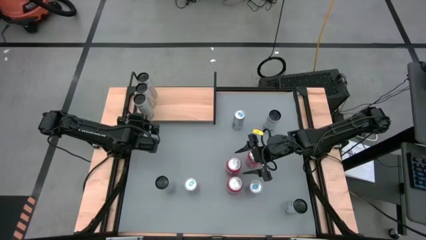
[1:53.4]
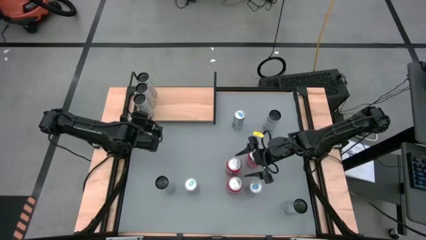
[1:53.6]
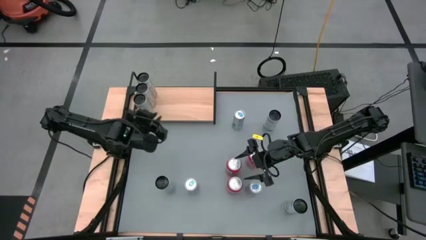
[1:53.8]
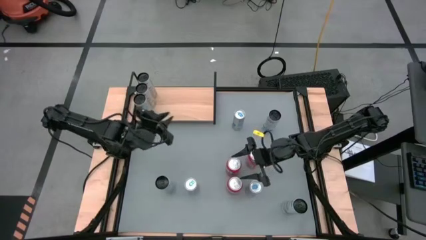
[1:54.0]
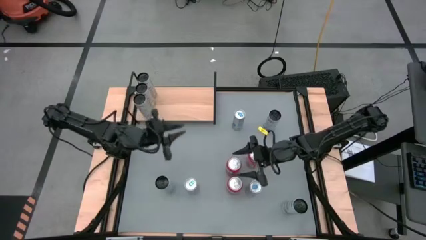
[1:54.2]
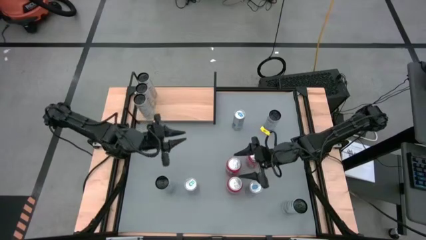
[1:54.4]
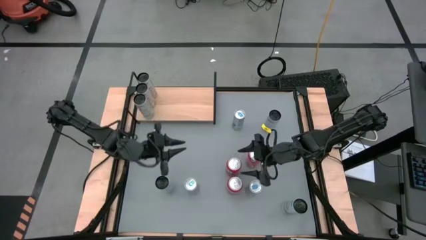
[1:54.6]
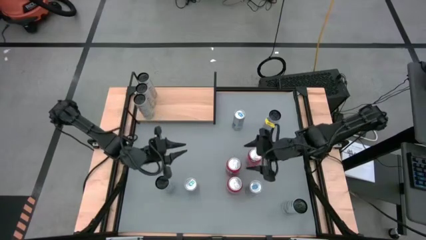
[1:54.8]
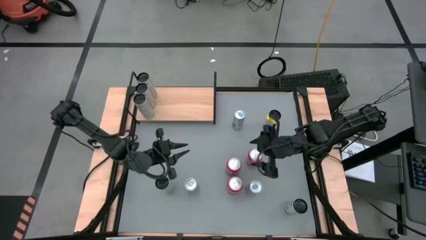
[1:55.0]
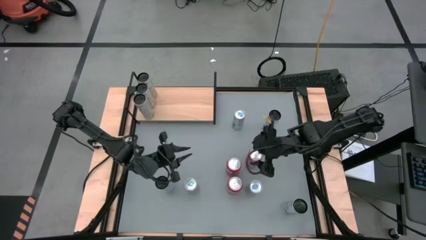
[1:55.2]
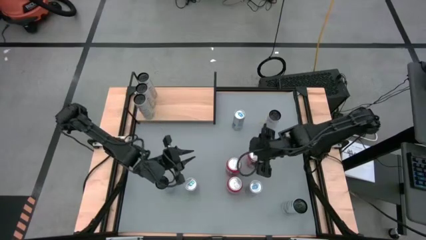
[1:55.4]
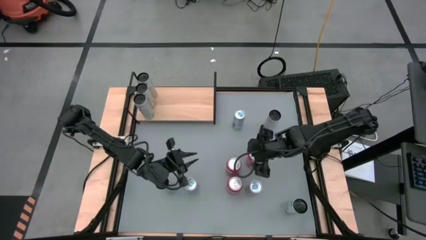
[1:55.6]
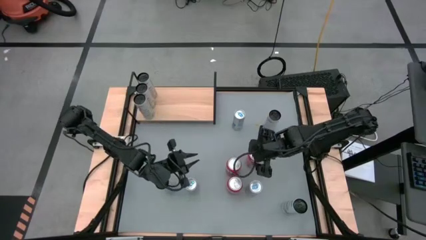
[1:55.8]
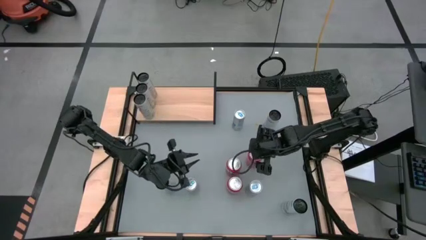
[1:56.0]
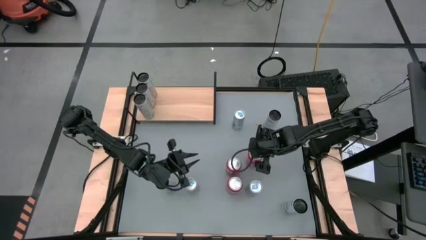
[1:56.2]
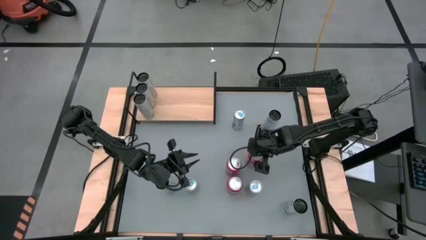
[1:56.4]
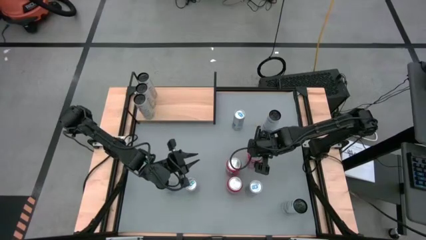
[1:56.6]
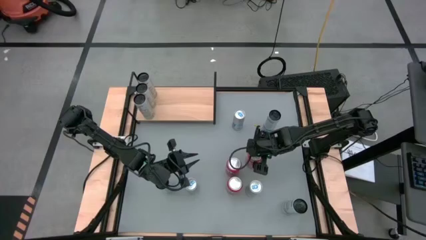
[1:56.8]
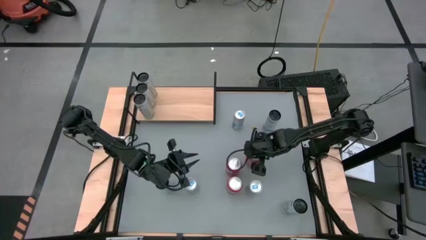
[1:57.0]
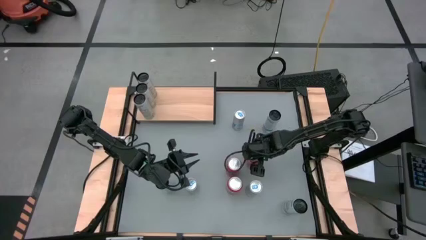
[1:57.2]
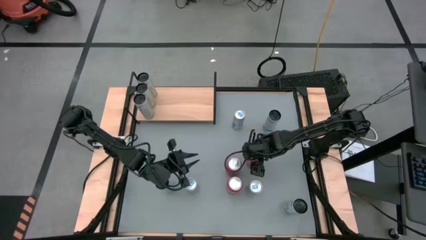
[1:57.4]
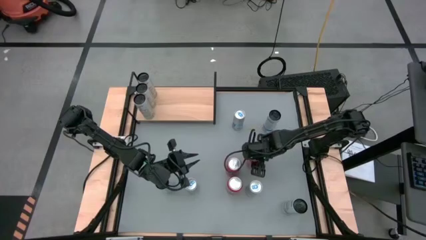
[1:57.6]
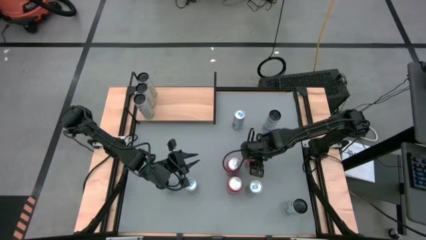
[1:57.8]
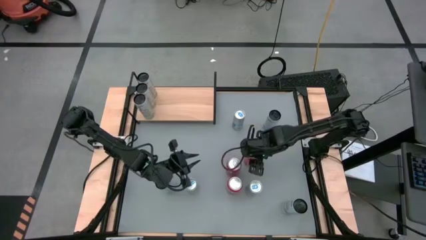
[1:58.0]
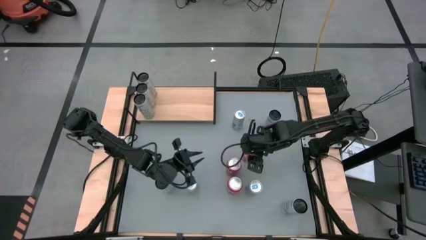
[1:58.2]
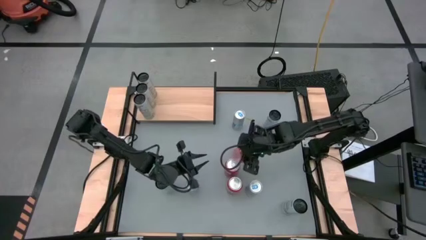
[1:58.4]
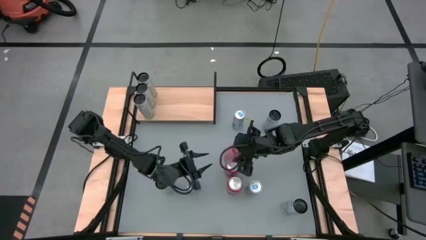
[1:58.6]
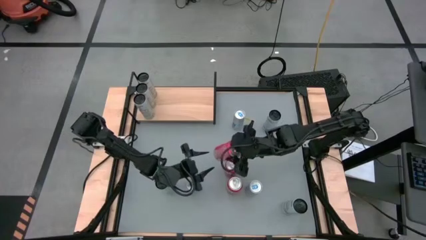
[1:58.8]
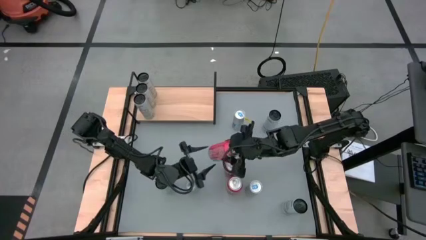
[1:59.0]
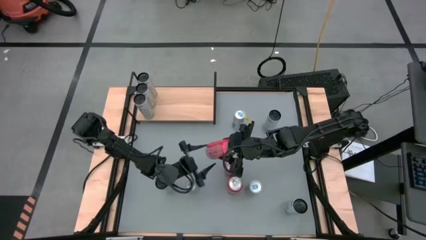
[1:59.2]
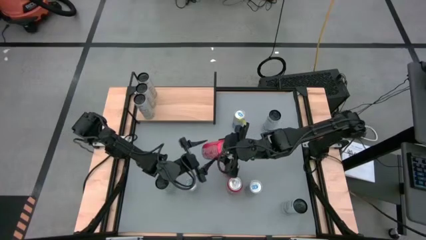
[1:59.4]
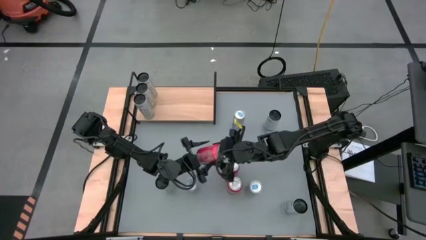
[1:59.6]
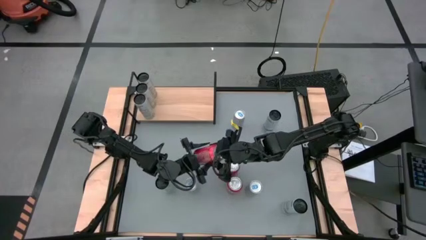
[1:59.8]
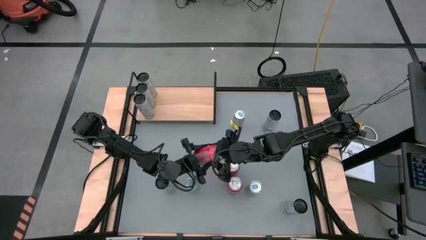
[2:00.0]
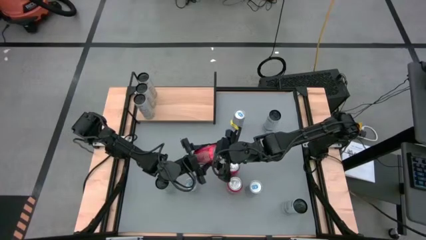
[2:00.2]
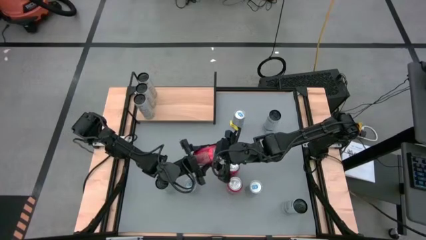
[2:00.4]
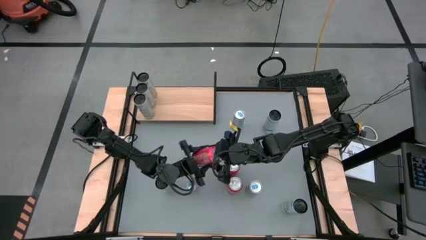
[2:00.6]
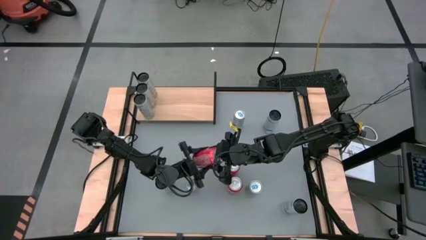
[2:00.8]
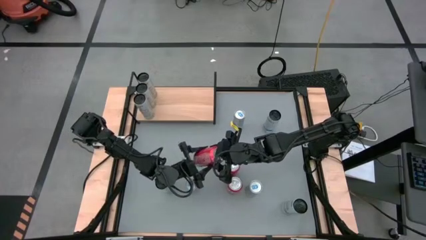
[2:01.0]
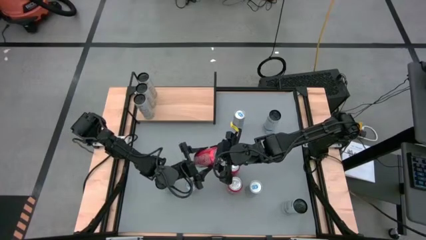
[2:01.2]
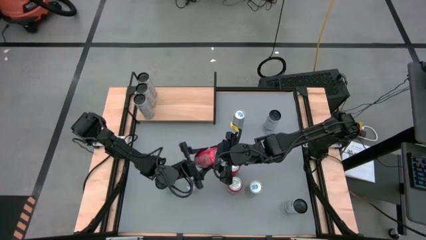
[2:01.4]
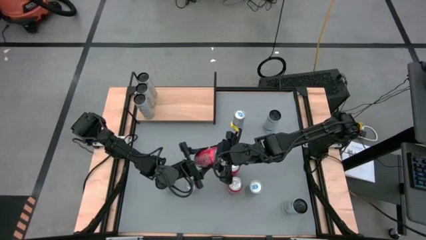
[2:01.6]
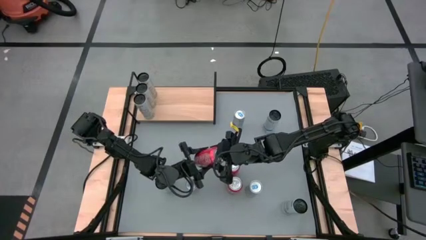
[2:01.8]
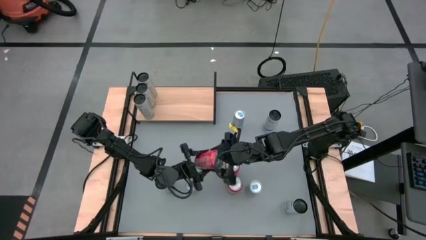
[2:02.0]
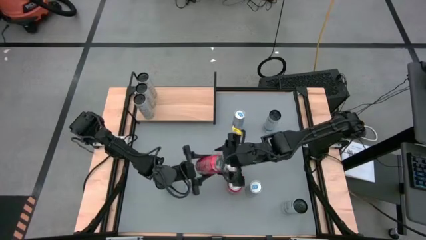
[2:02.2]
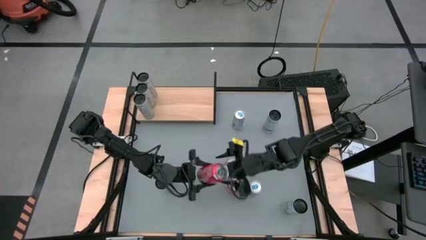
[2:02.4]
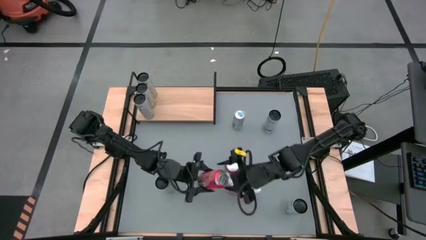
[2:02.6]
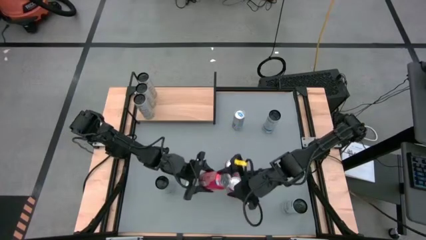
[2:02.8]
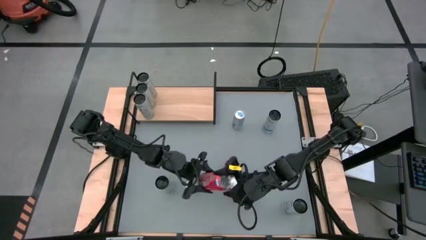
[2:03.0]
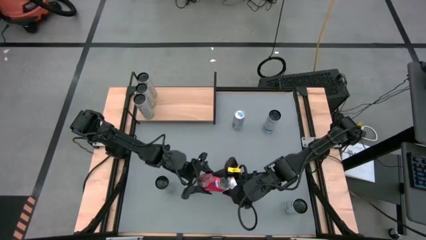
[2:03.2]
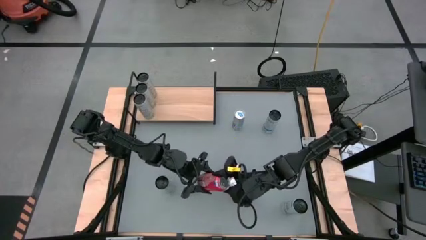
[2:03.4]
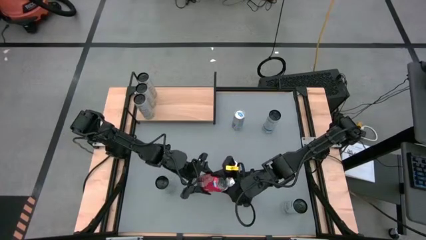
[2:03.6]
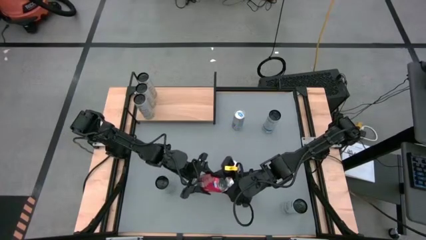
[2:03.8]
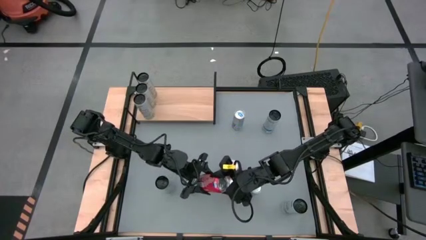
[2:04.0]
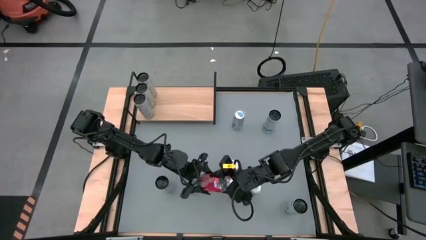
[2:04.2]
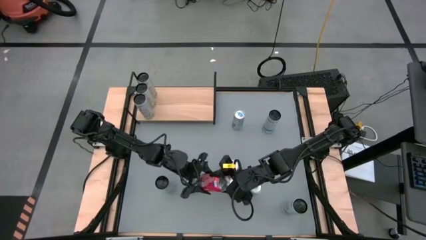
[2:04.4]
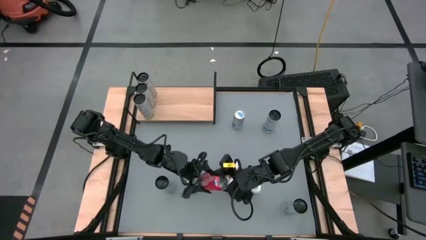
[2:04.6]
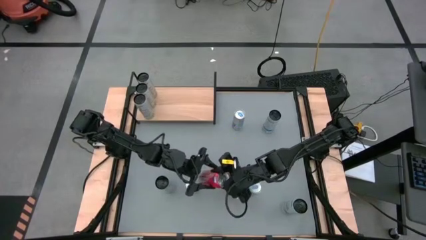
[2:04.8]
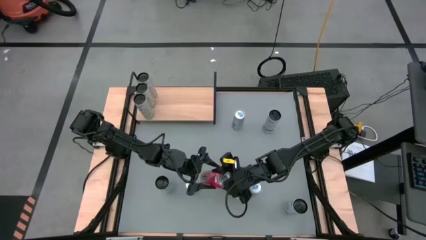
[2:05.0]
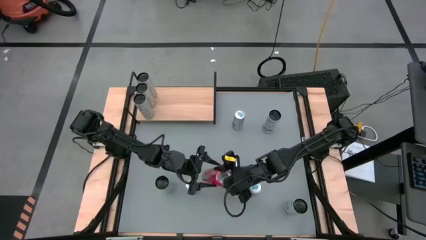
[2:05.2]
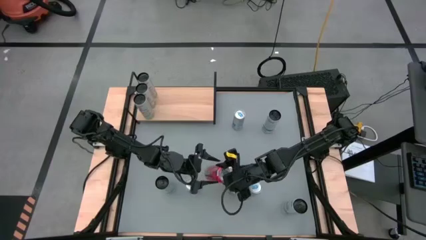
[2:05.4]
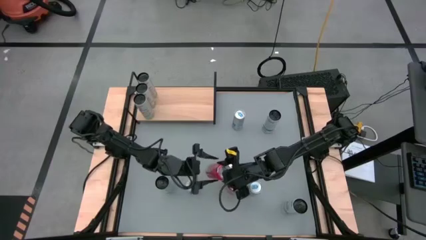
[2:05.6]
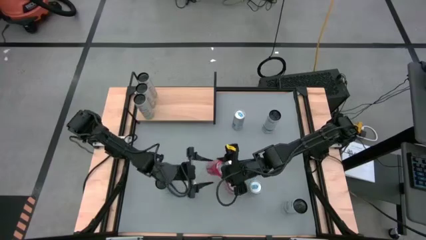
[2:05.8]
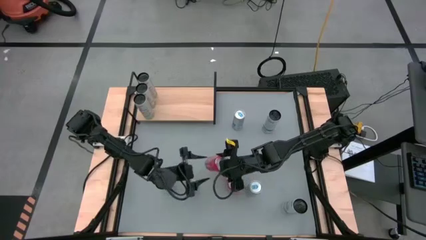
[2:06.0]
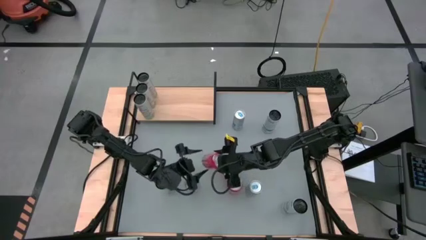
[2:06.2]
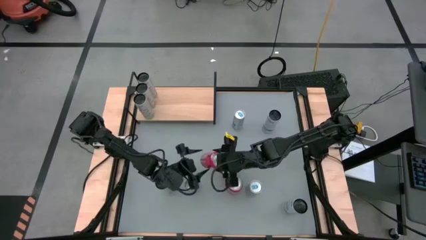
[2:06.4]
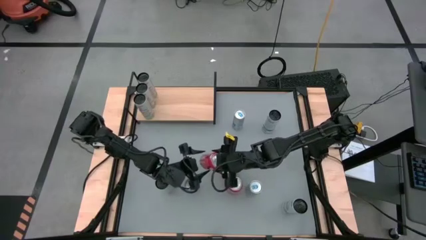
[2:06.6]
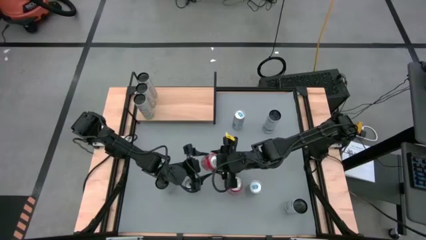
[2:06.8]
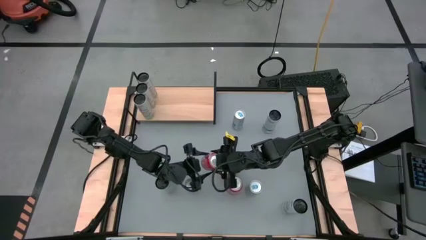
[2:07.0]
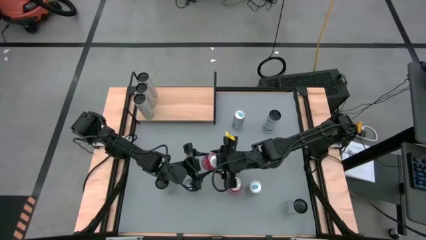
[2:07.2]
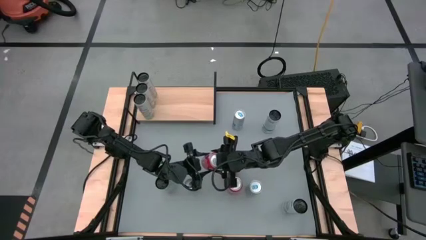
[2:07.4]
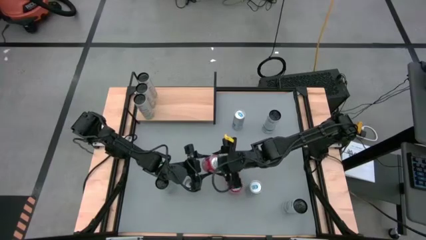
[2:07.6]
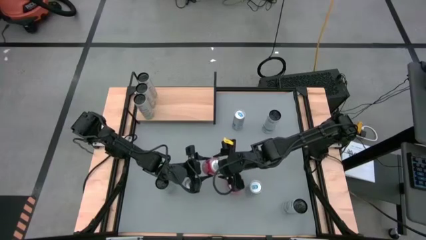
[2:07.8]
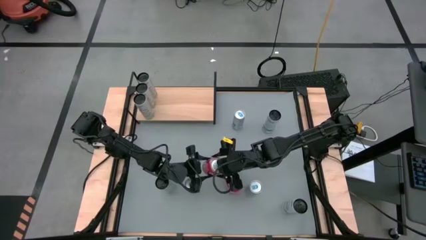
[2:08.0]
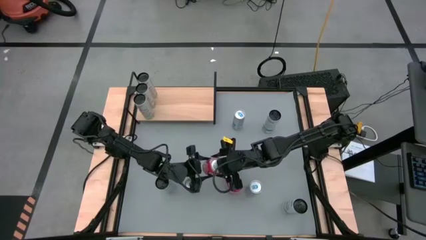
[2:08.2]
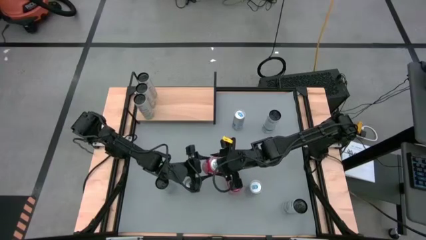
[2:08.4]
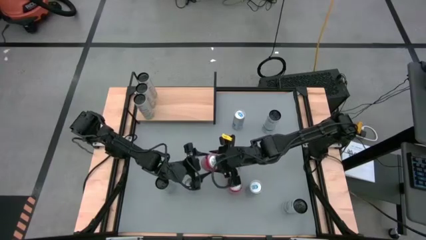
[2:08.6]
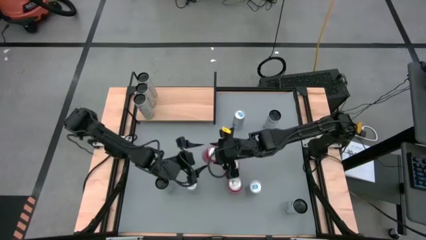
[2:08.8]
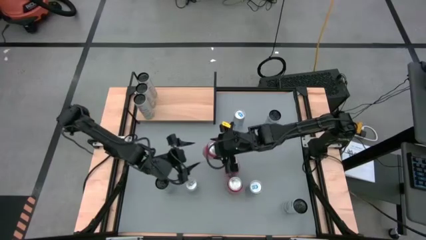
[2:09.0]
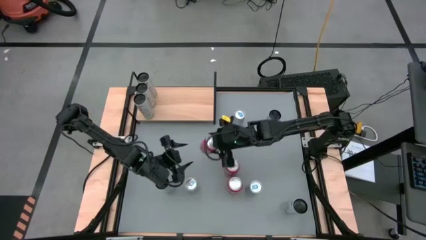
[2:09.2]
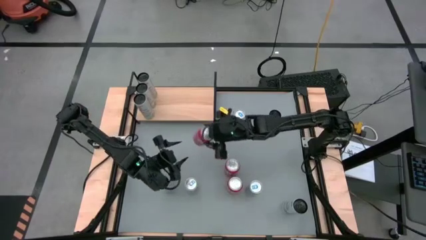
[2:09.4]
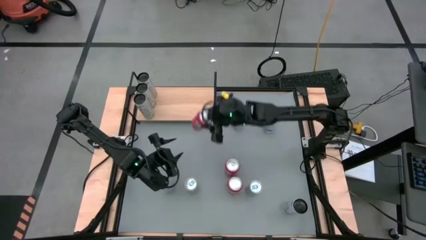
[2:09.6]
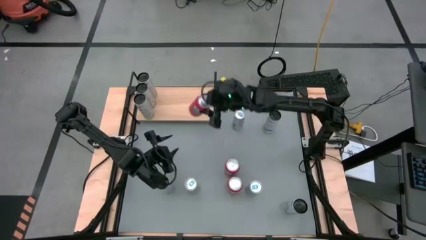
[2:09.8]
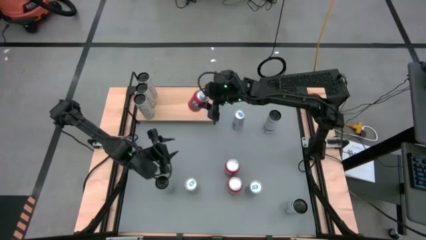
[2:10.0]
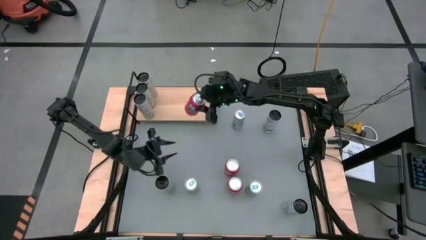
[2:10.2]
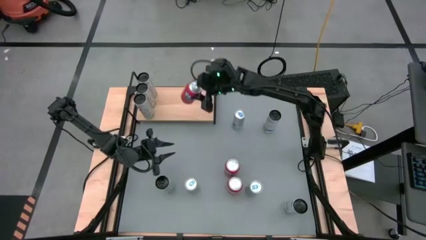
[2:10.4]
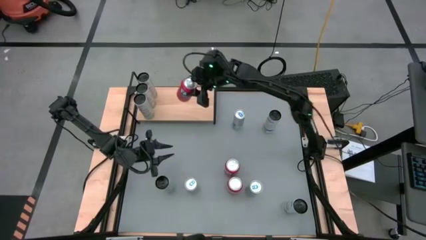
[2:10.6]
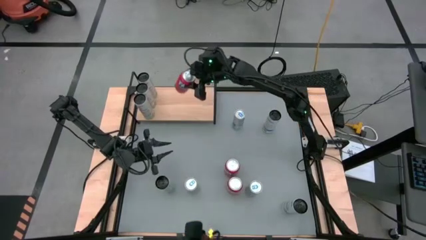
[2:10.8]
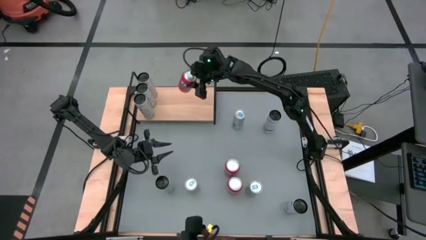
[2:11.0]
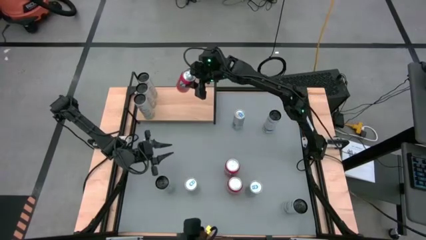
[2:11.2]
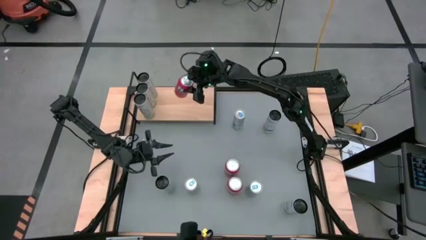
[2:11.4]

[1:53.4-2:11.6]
Task: Place canned beverage on shelf
Put the top red soda can on the shelf
